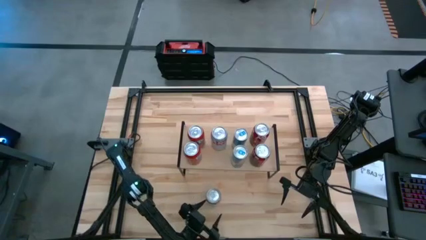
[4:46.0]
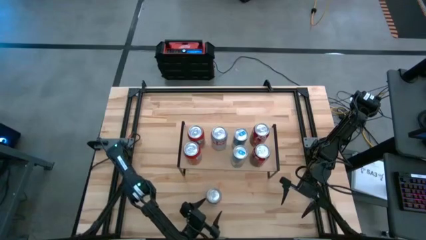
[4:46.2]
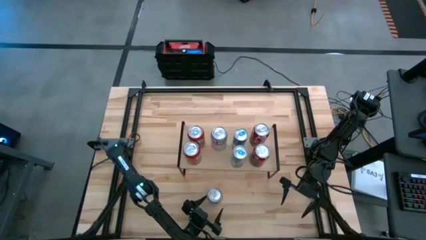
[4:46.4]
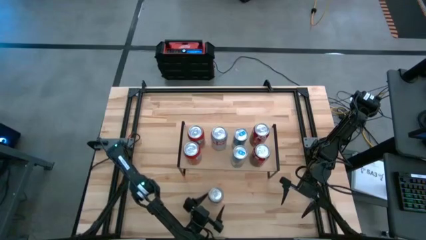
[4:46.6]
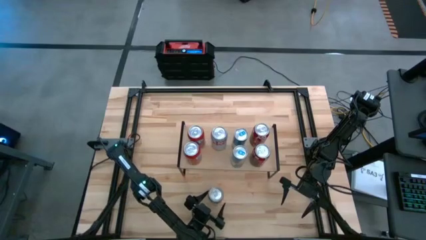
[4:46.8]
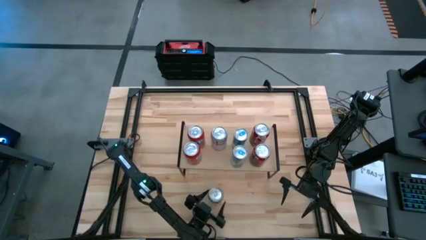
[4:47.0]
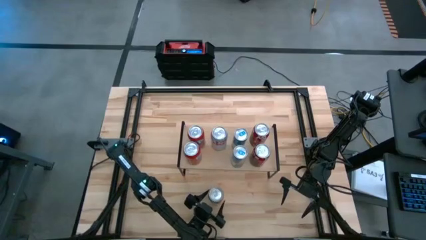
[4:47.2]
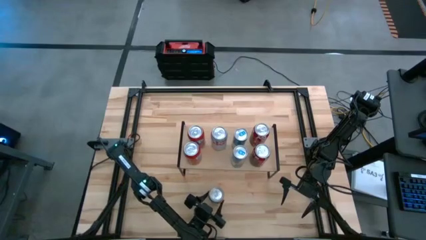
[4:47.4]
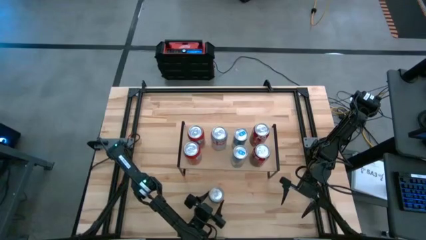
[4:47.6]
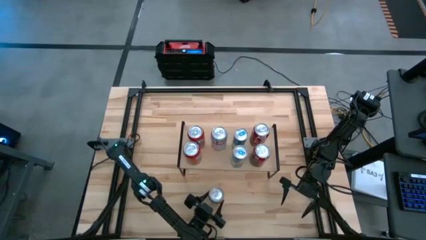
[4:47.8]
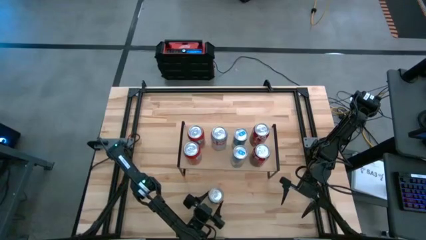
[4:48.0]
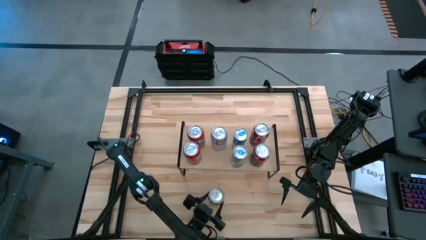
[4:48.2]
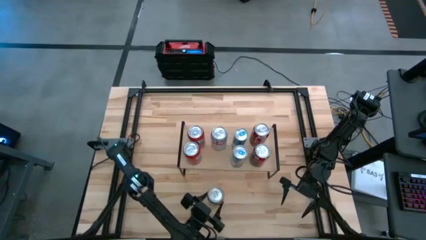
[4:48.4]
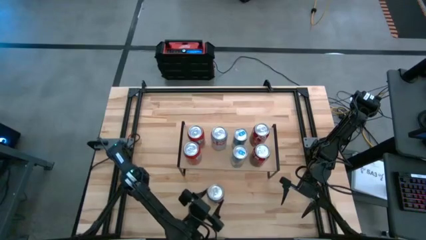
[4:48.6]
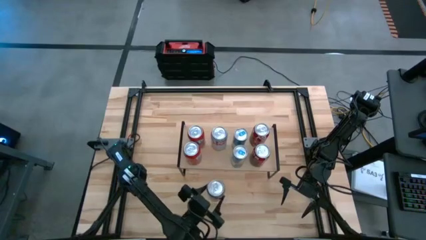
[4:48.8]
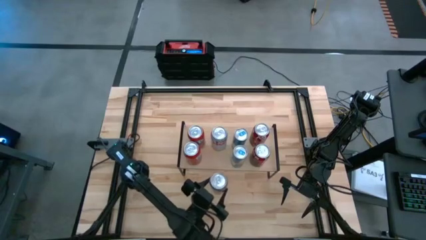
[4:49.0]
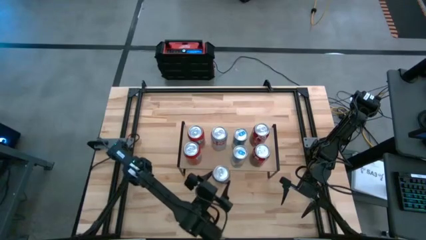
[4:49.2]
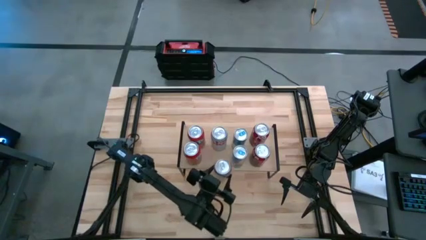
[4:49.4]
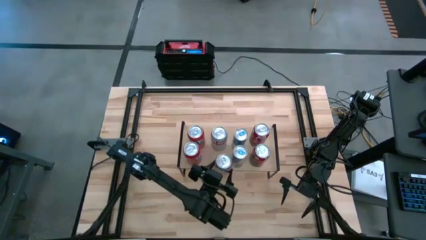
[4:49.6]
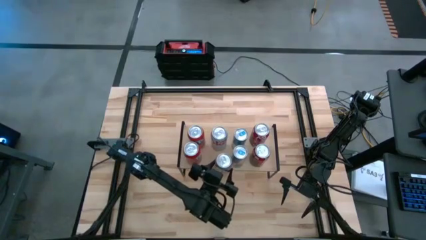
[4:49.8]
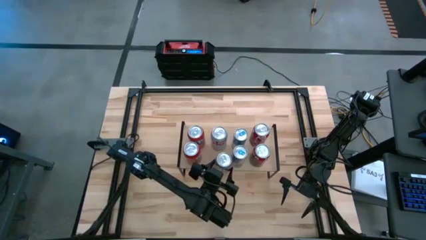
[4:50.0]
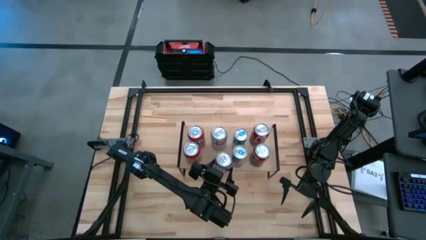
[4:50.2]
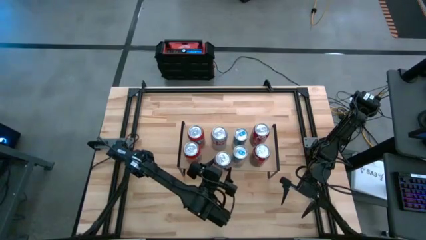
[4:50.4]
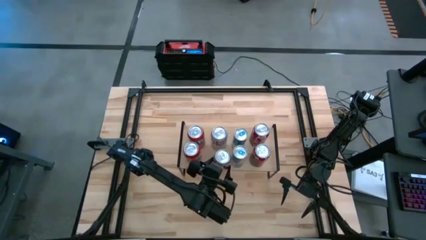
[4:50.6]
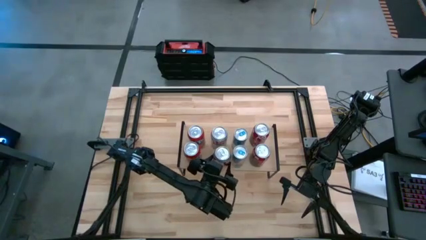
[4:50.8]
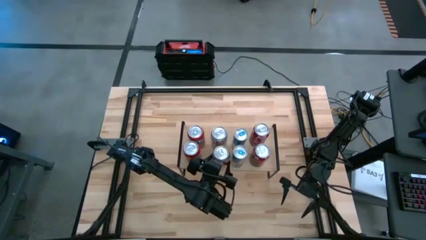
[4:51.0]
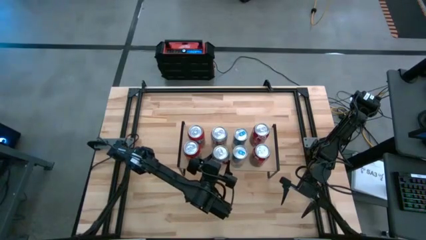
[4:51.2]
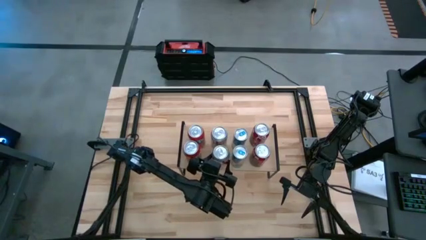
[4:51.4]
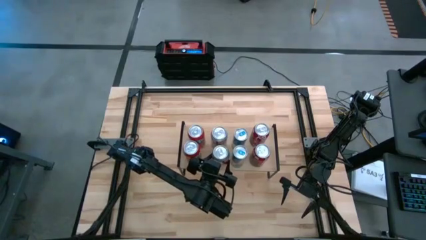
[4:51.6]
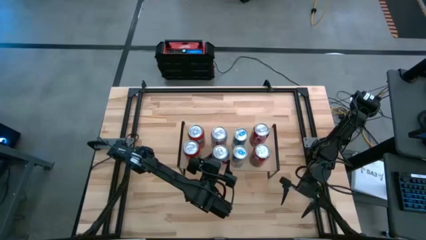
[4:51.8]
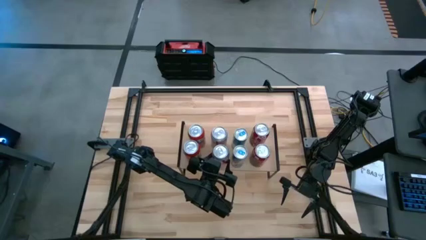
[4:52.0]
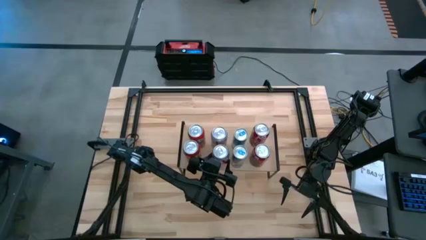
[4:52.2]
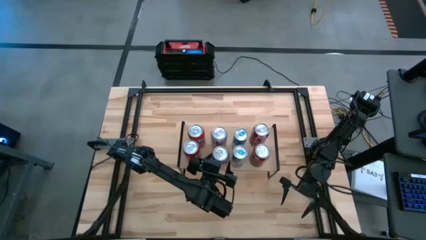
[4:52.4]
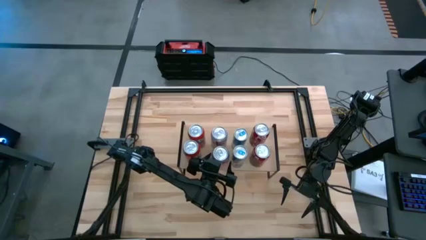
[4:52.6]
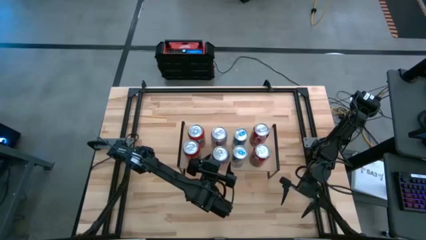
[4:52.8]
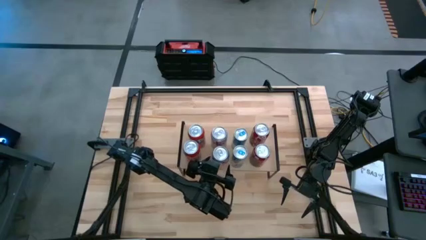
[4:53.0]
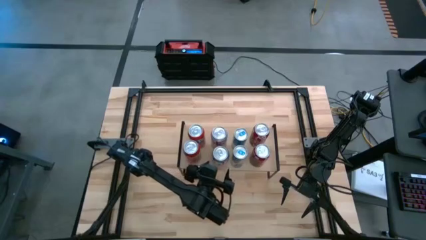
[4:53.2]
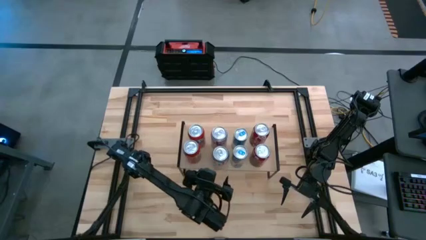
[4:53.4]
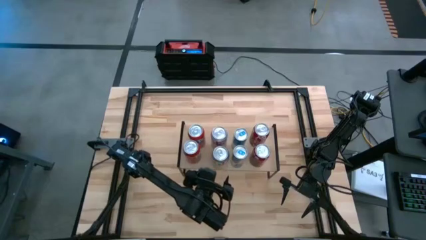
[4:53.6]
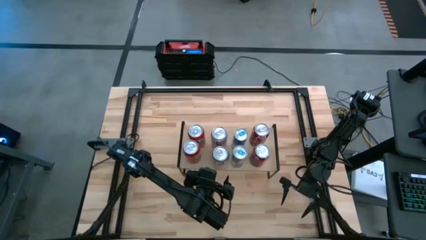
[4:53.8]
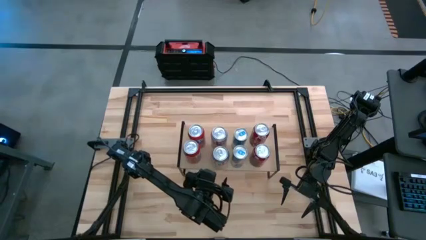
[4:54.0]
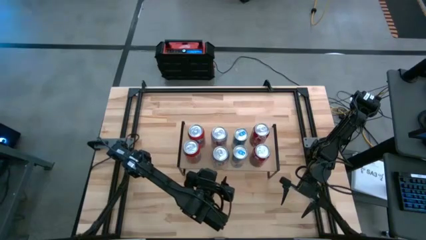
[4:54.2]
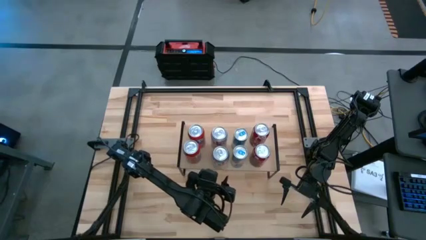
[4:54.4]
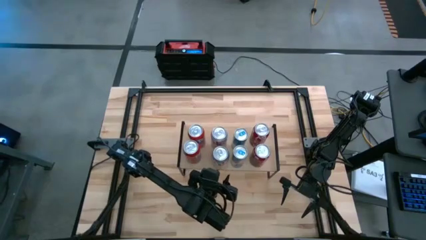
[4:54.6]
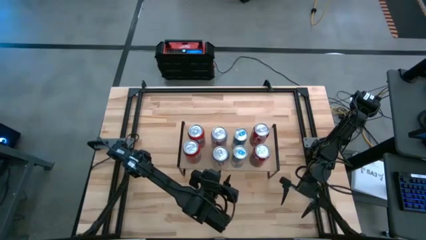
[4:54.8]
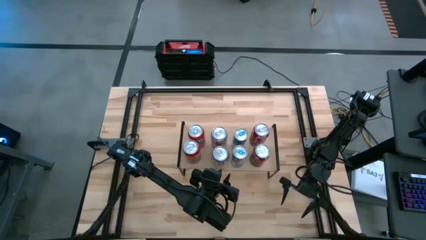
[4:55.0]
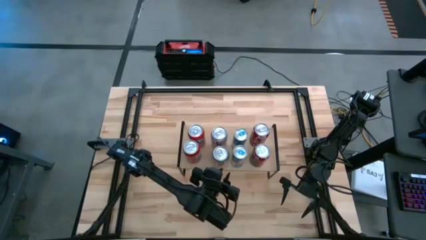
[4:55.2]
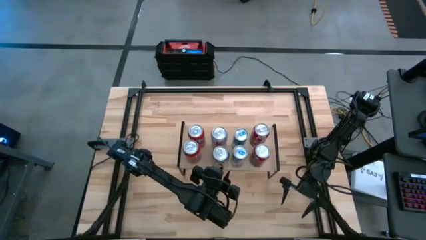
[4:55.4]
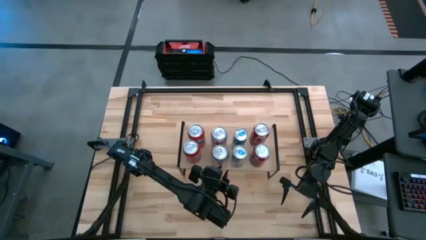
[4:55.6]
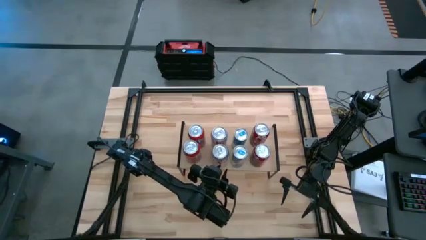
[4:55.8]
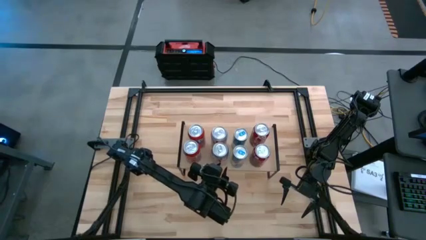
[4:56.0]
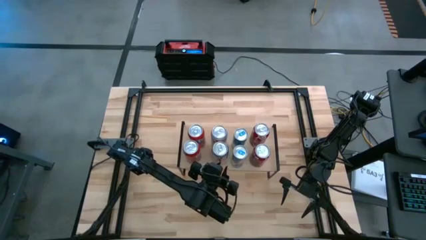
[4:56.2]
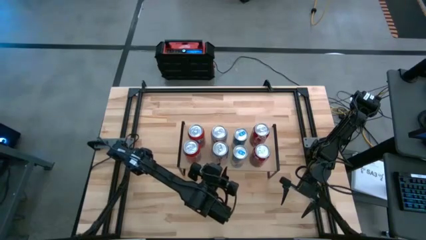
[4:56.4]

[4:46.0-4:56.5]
Task: Place canned beverage on shelf
Put the silver soda can on the shelf

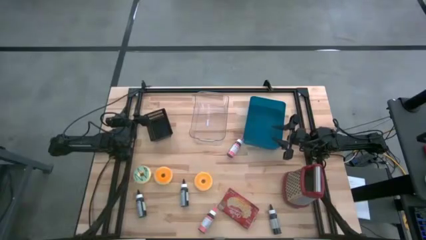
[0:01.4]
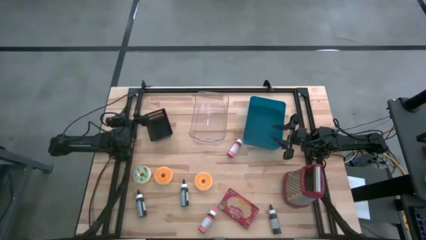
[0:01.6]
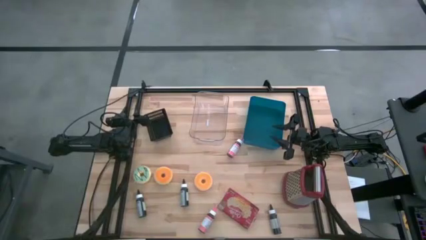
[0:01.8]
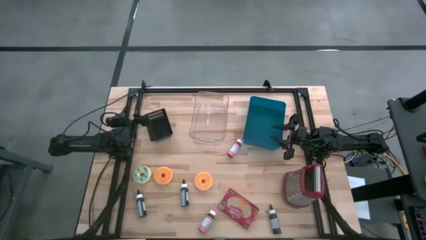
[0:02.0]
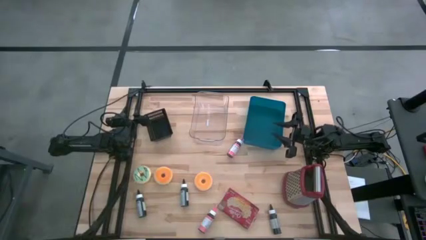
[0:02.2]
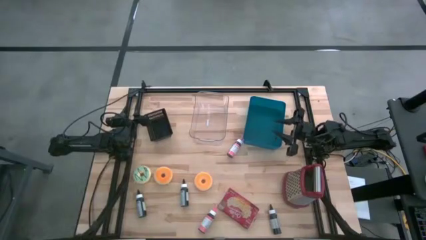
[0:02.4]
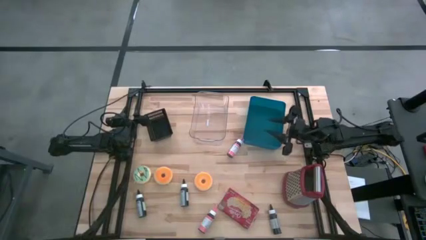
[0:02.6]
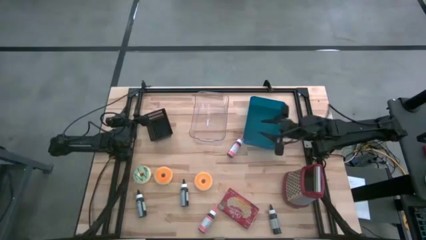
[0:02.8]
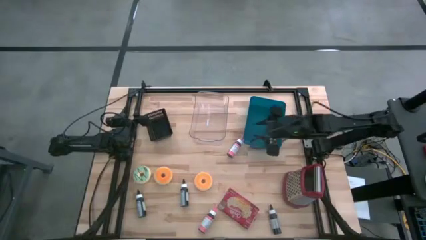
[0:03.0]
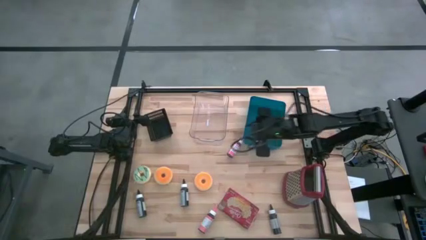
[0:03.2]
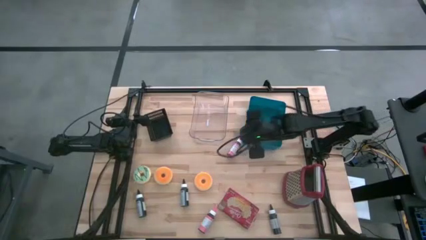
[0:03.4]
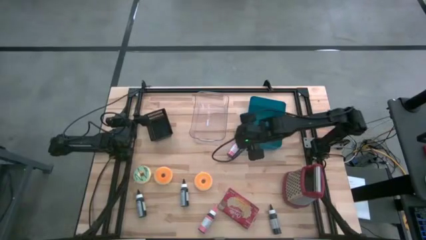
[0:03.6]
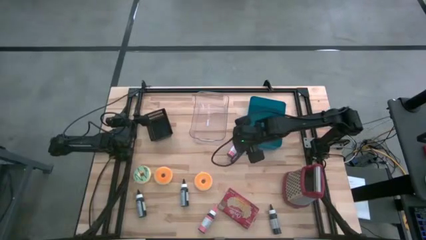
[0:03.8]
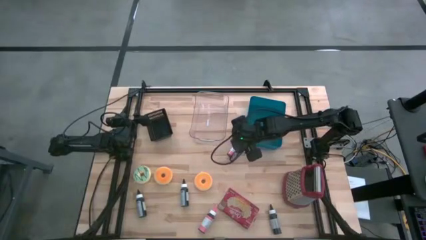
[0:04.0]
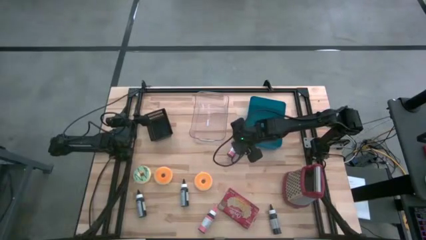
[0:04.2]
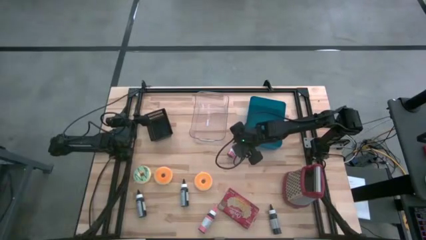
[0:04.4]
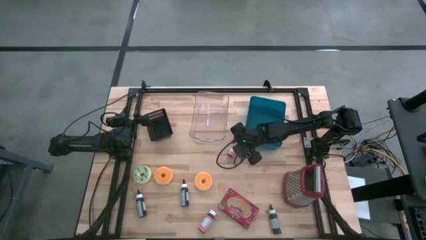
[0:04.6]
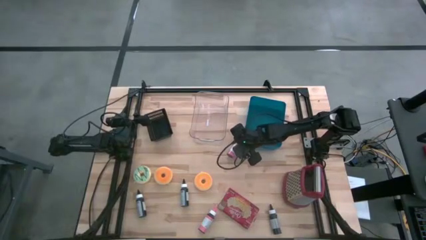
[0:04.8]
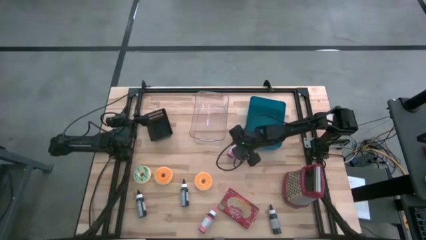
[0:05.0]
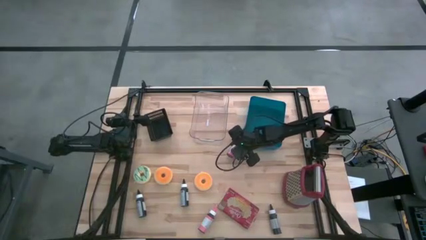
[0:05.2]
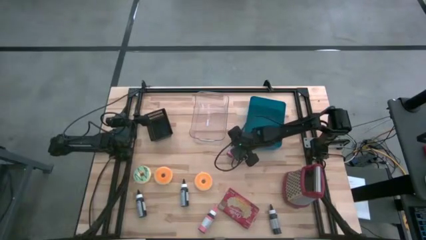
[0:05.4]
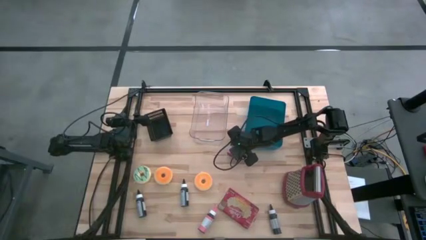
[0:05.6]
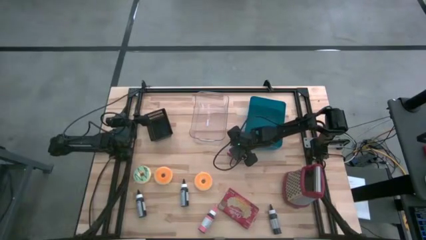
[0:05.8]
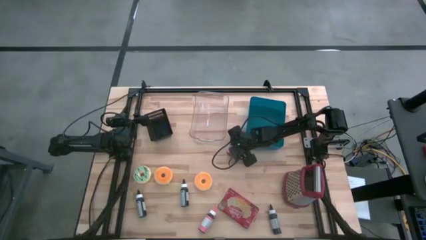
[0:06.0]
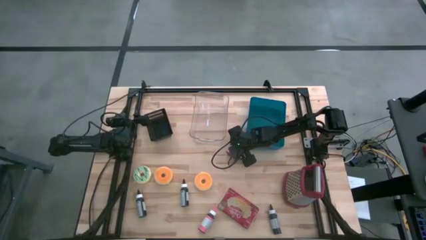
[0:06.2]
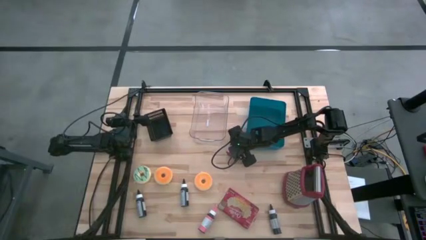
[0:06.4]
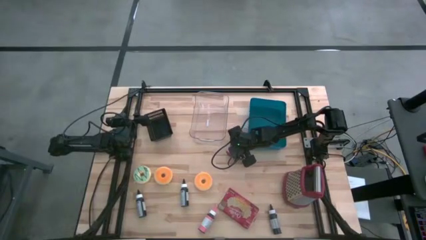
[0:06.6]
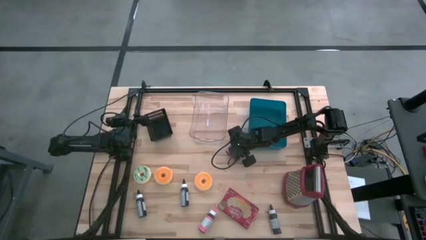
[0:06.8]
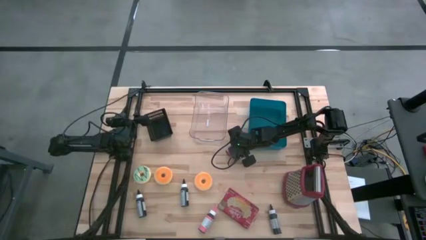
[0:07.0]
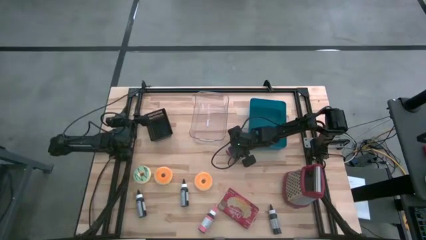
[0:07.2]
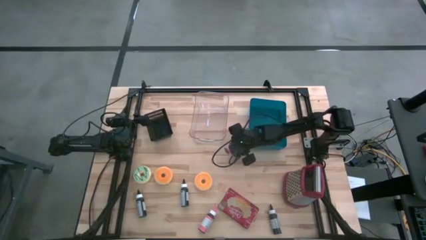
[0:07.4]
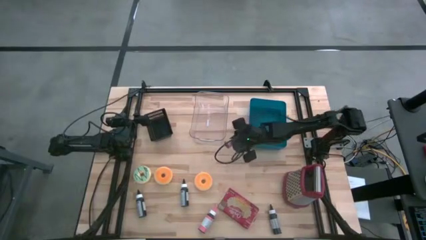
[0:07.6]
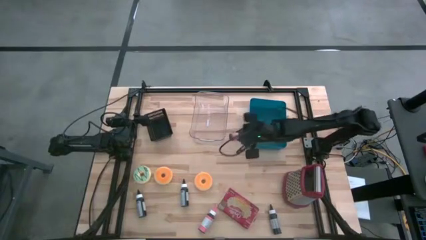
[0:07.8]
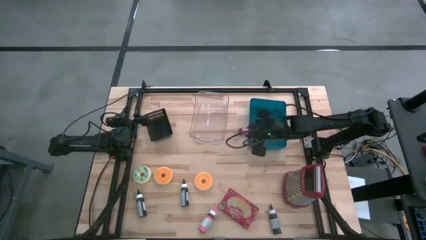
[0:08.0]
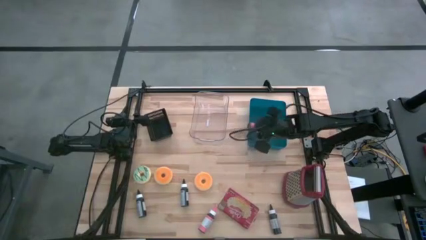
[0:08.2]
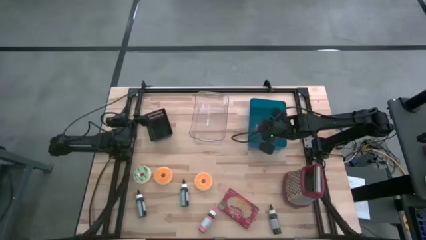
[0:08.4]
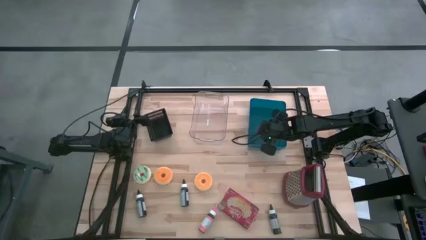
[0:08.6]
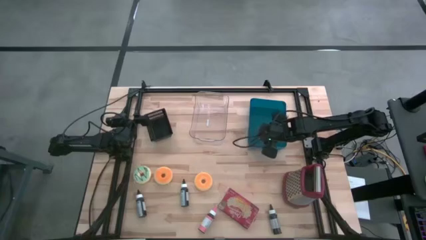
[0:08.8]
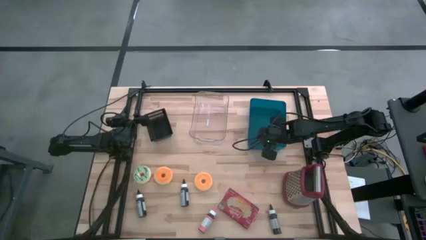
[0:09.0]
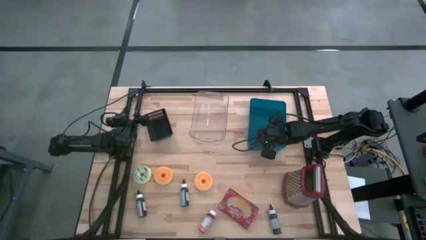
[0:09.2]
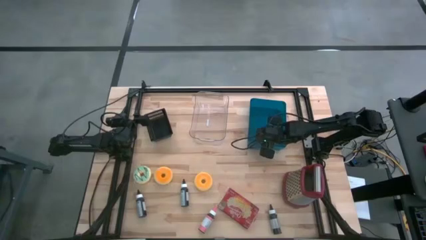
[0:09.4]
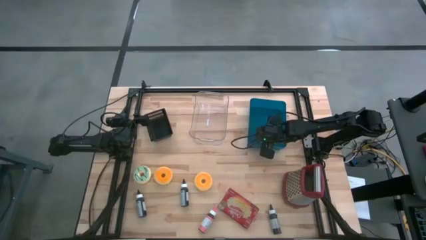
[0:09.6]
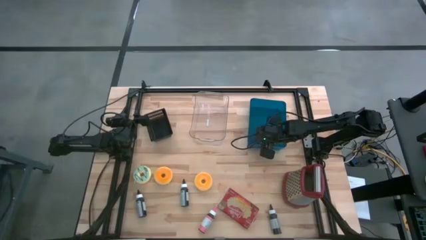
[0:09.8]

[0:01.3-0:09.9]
Task: Pick & Place Food Item
Put the top pink food coloring bottle into the blue bin
